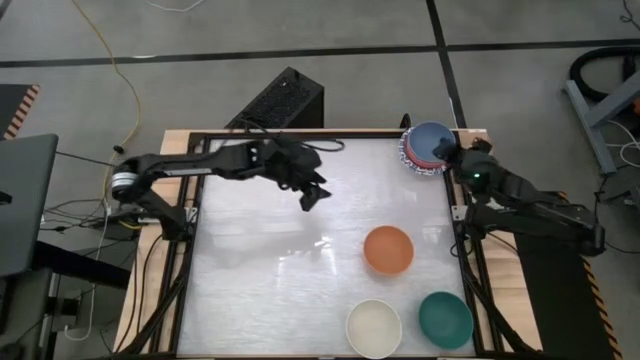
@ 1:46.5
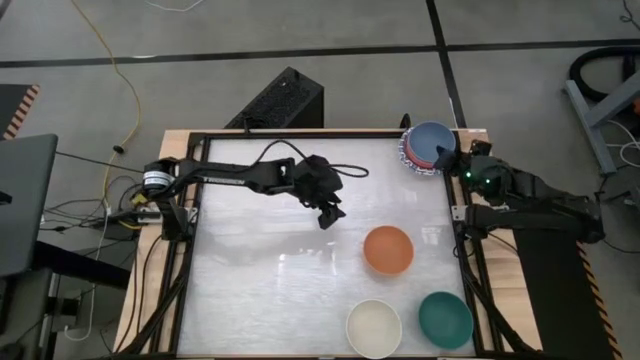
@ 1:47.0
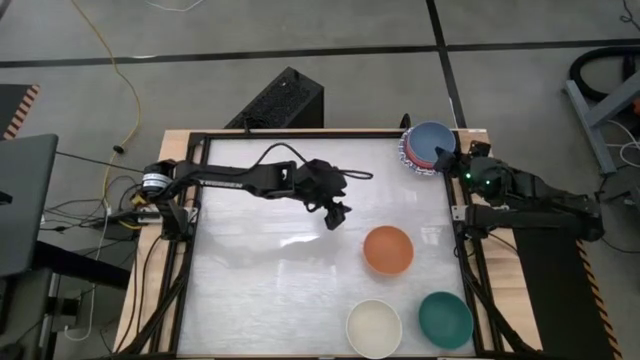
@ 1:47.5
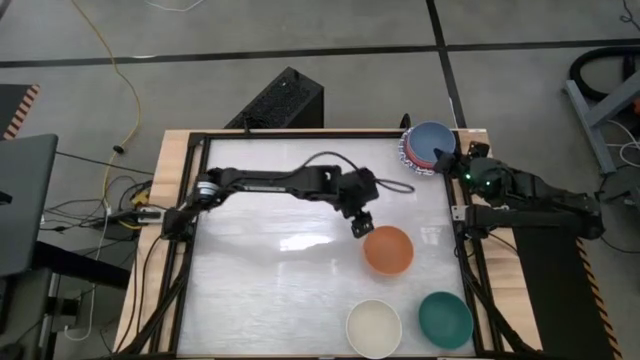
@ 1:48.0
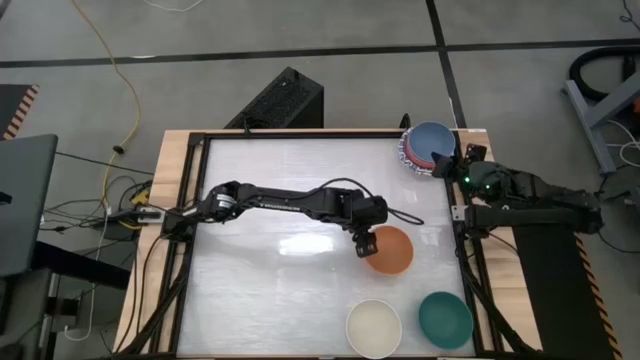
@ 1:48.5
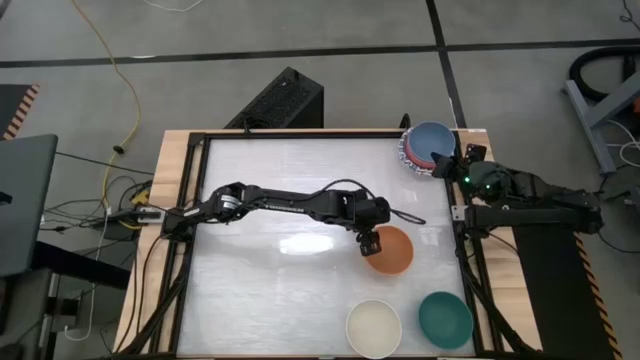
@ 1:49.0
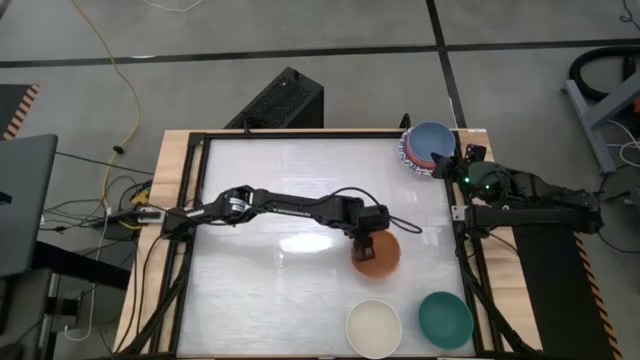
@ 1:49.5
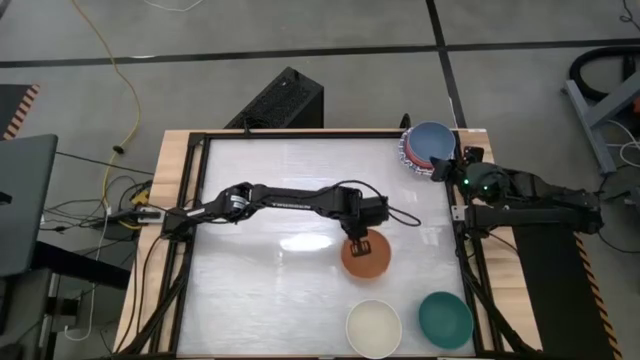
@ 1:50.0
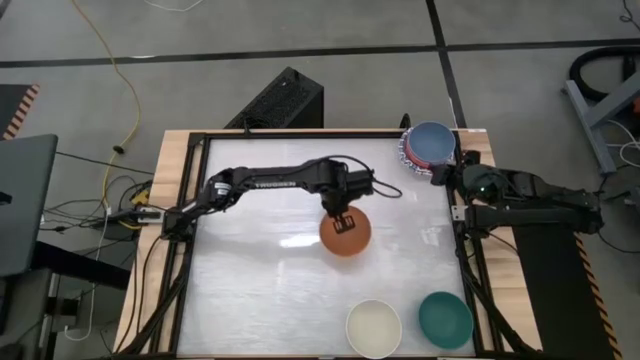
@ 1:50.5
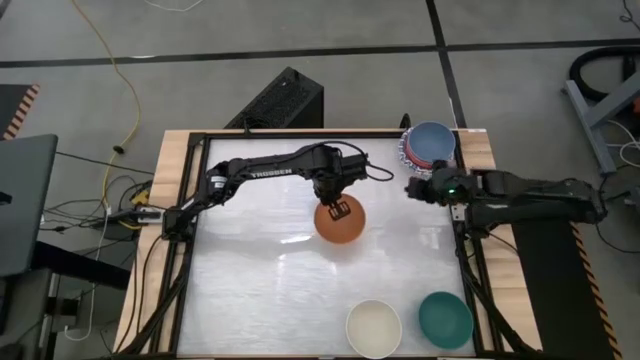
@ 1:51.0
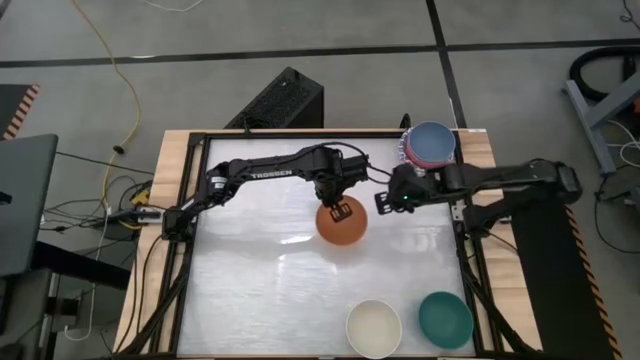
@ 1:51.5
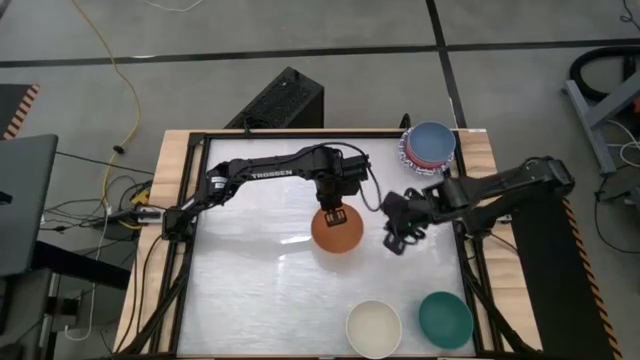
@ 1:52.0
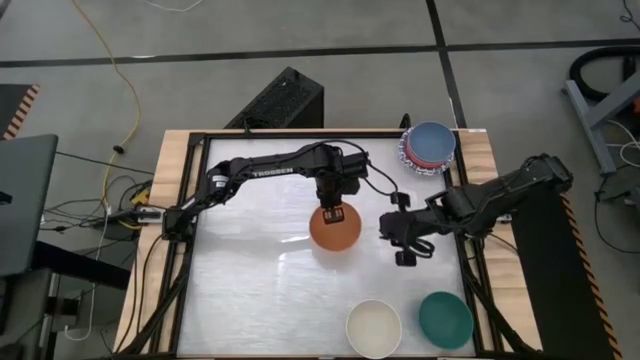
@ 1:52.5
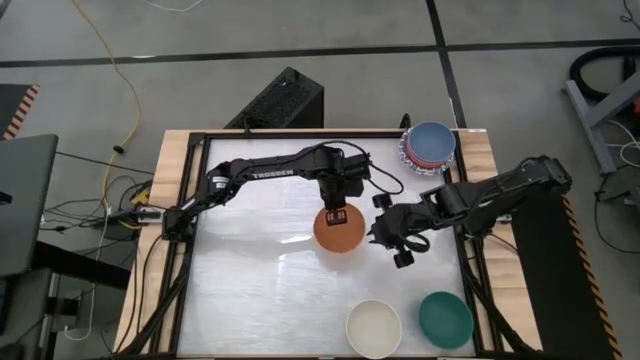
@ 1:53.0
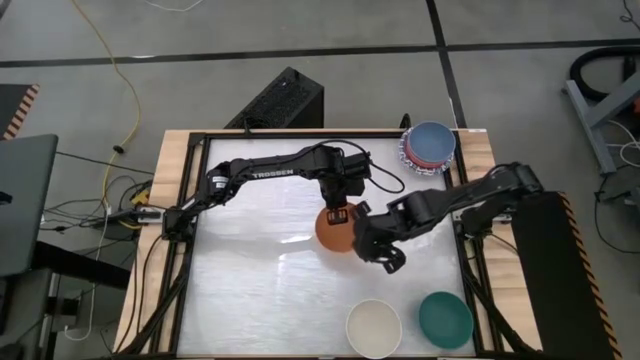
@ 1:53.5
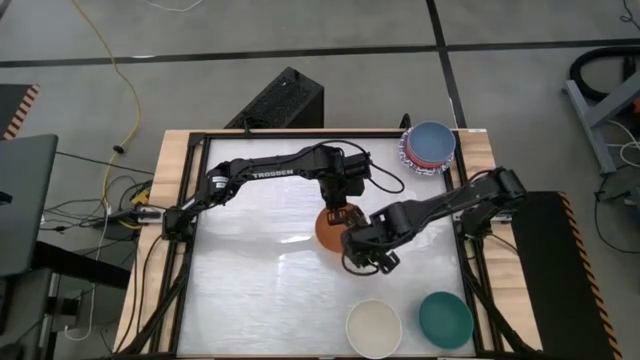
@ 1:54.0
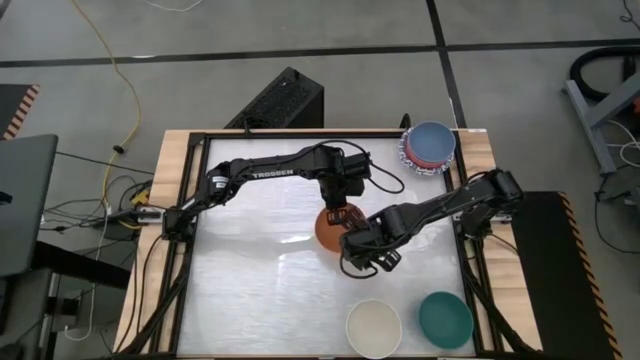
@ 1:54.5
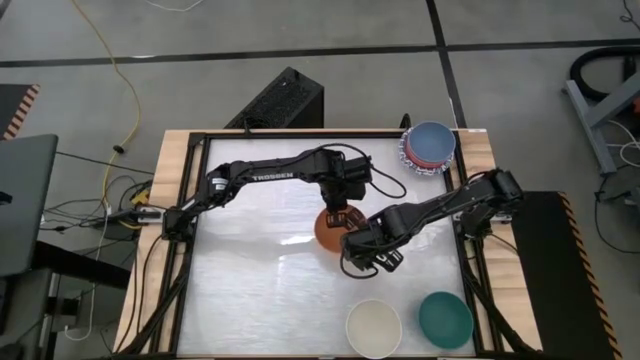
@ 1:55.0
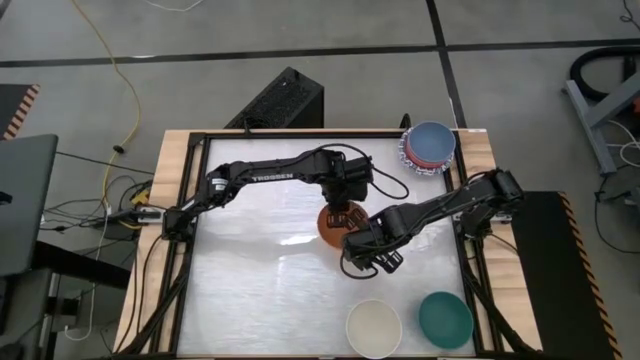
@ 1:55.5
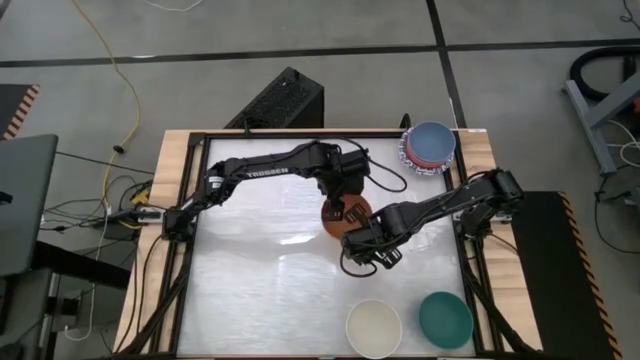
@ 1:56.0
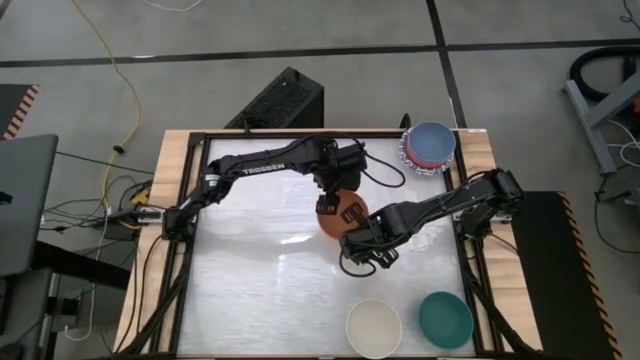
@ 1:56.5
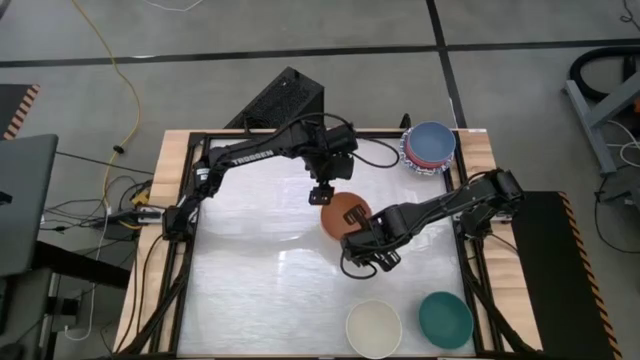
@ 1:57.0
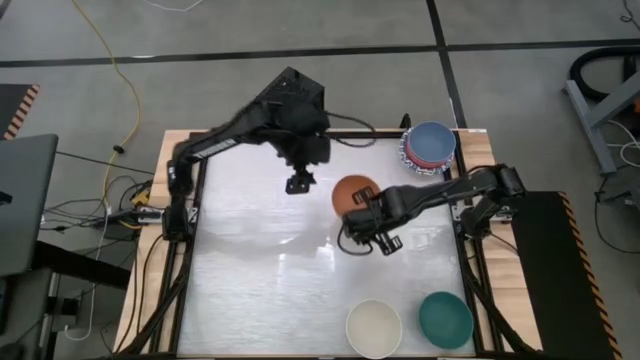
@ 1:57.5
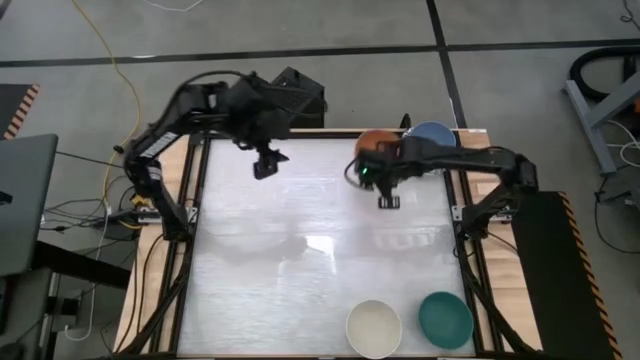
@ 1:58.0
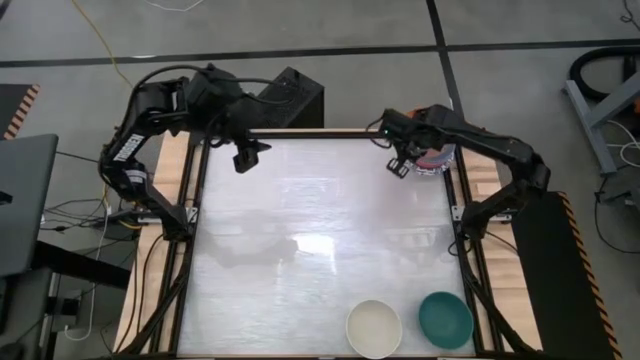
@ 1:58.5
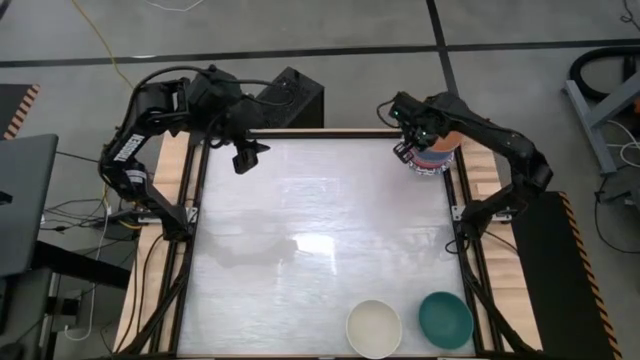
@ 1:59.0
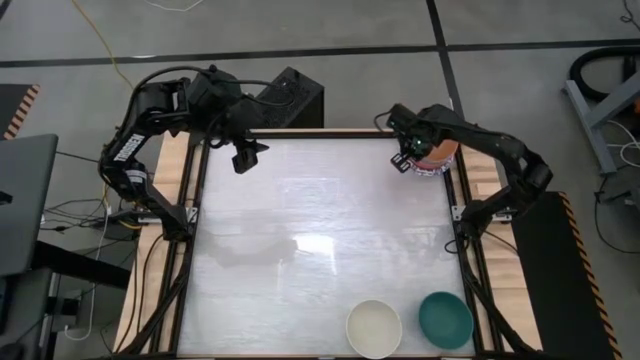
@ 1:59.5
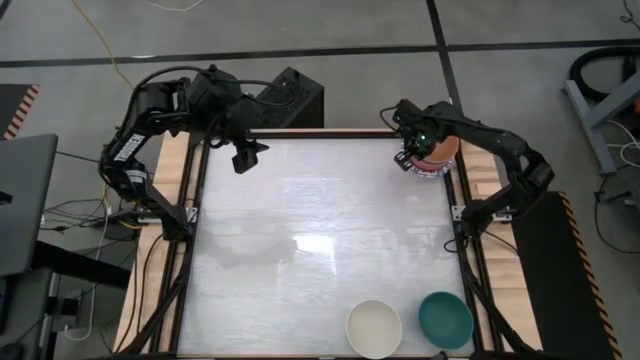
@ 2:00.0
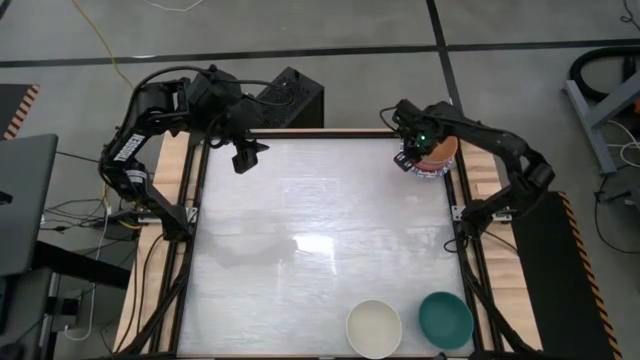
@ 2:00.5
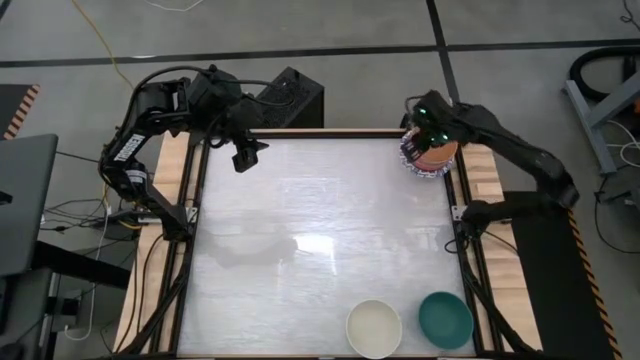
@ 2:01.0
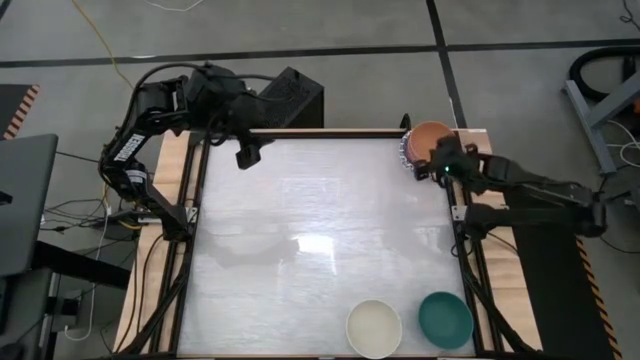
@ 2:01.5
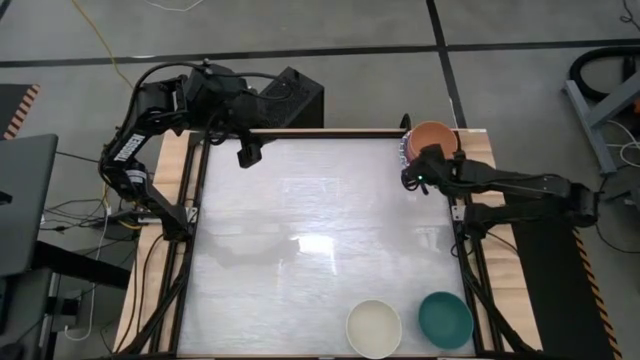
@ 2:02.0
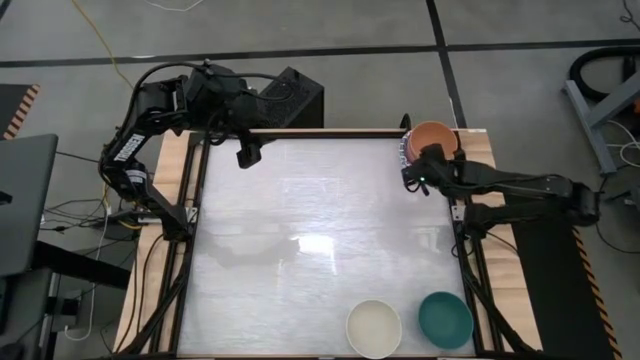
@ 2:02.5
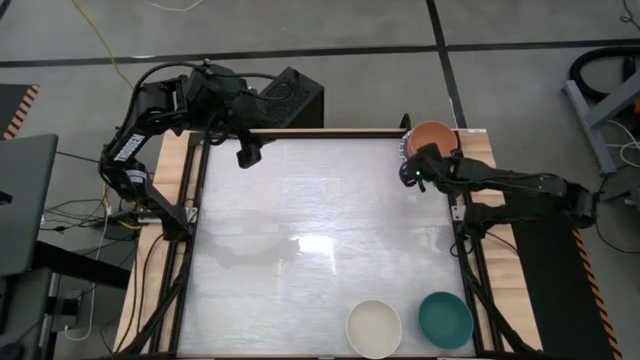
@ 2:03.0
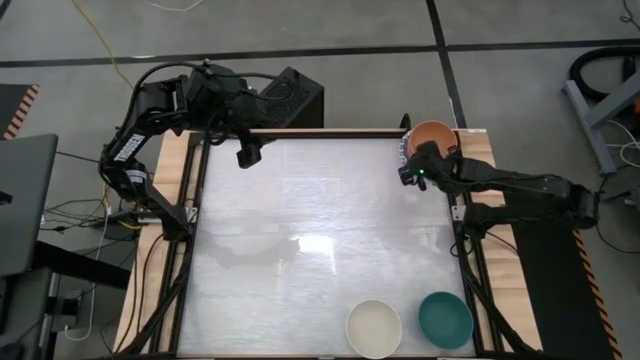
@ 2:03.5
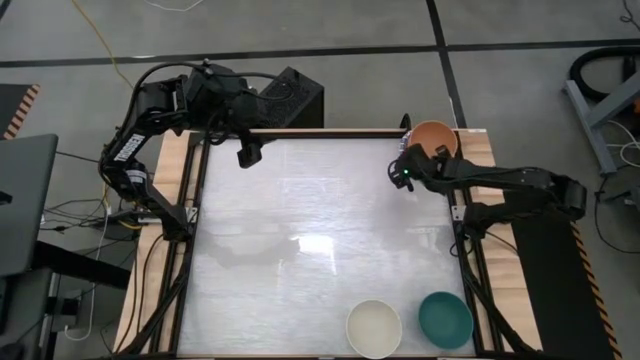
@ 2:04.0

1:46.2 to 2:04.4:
Stack the brown bowl on top of the blue bowl
